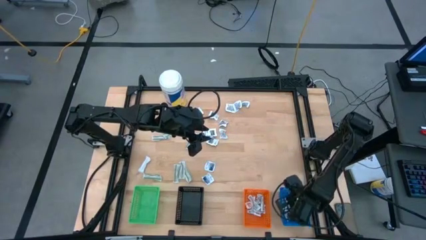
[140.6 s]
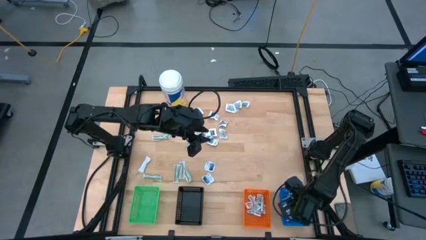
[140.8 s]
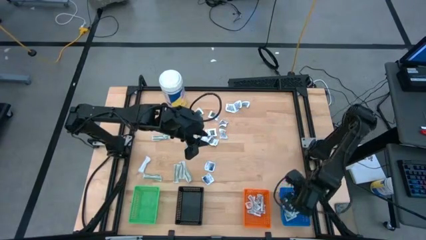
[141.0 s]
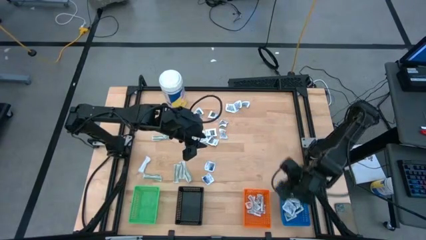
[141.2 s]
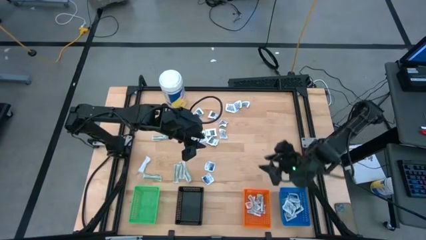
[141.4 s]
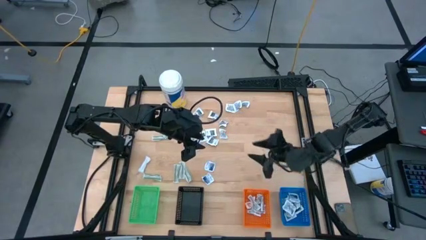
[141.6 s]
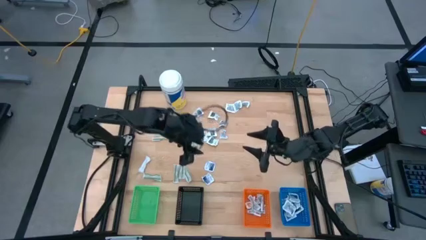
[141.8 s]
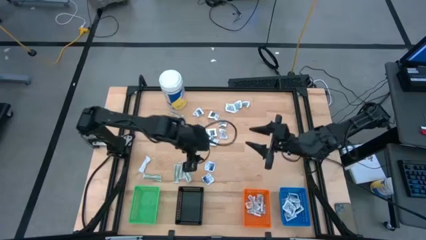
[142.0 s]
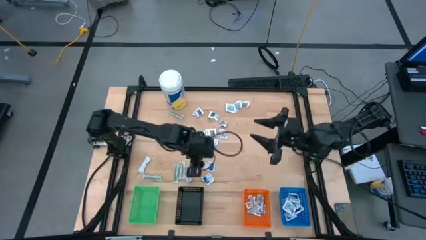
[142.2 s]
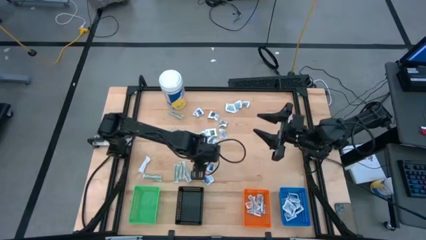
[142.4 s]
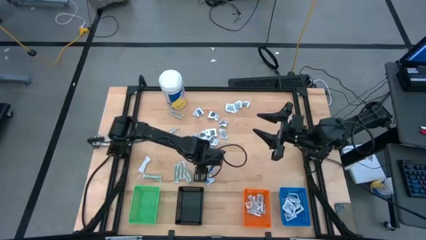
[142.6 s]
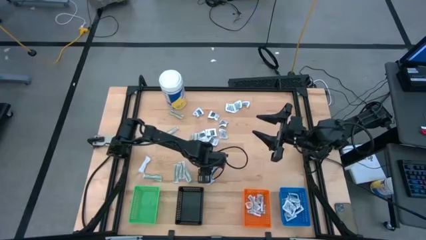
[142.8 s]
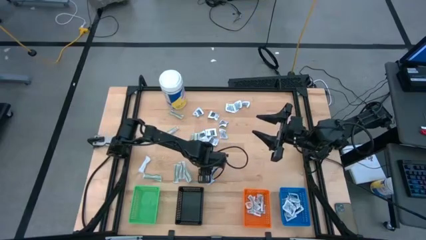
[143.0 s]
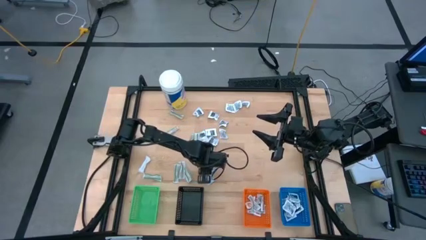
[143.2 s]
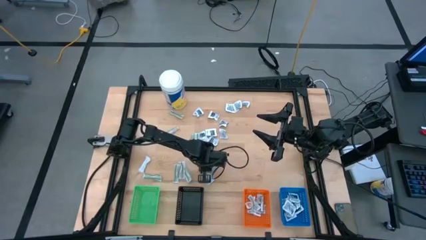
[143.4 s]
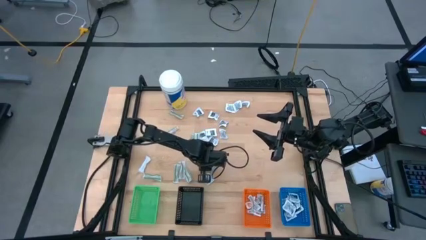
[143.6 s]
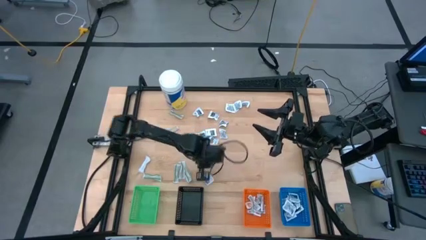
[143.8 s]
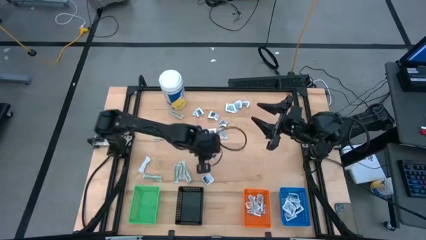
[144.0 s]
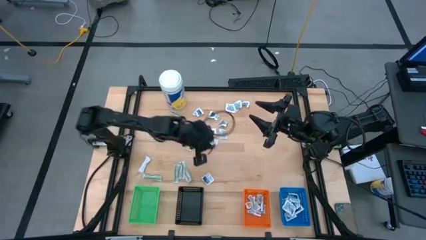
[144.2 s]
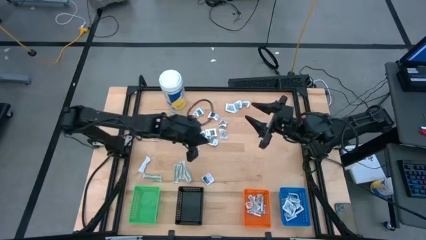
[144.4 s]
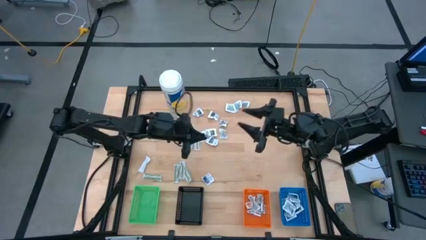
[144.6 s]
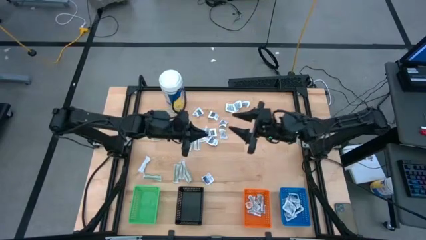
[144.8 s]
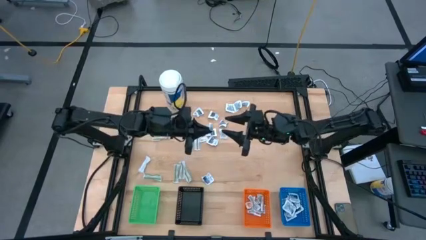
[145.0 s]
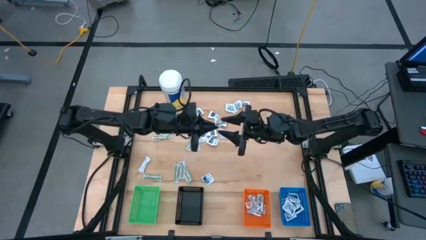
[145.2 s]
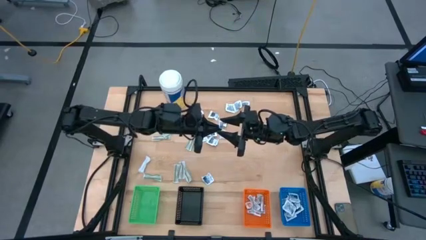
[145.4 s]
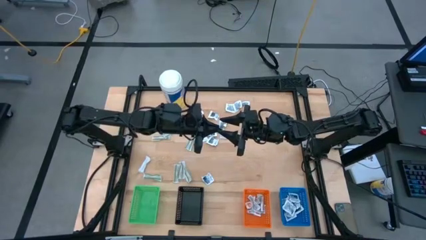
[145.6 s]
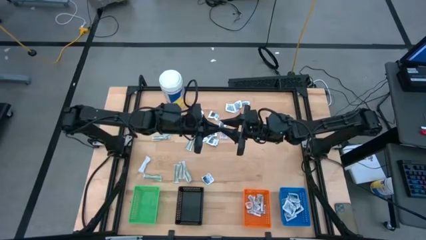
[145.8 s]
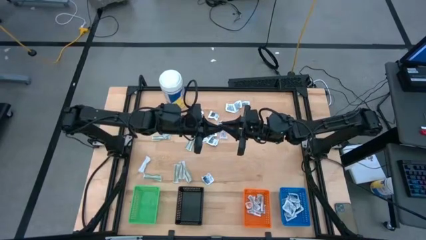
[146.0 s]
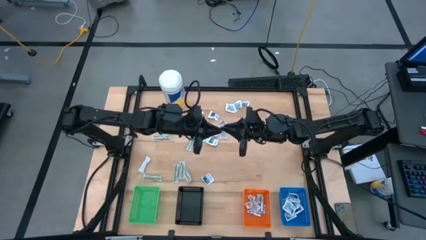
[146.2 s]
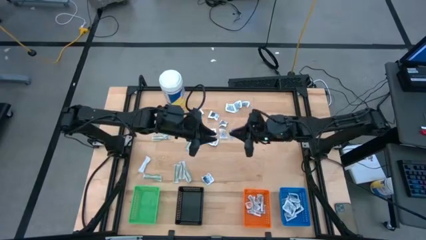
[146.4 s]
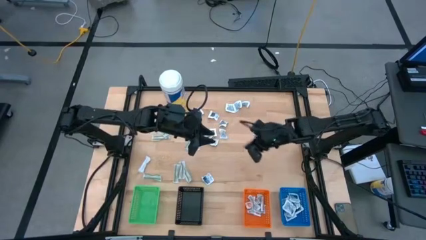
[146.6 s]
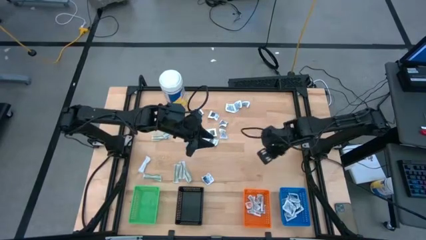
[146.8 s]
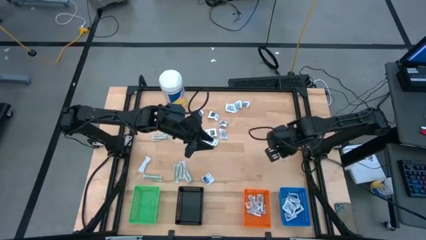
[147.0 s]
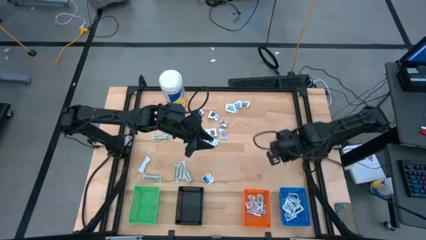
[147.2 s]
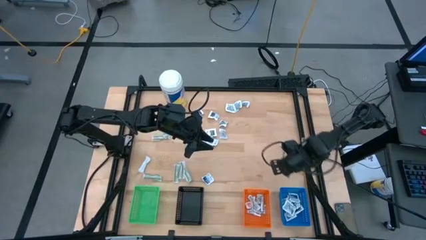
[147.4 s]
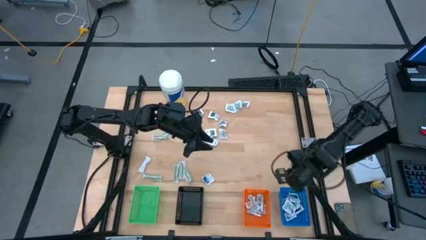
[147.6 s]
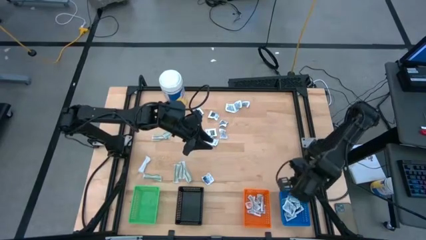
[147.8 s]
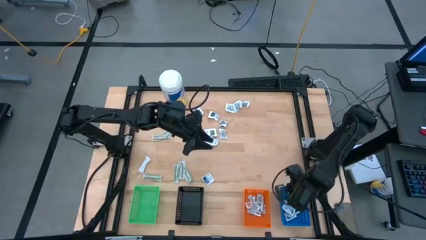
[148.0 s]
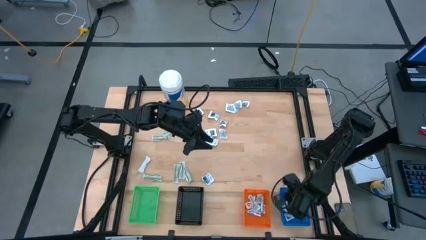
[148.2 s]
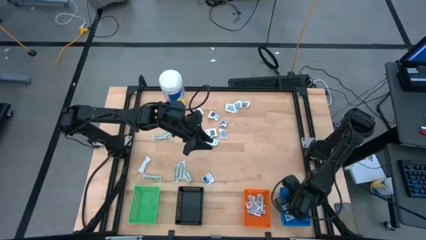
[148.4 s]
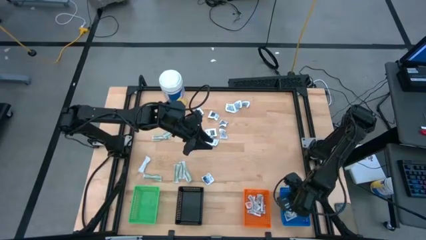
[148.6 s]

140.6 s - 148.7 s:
Task: Pick & Place First Aid Supplies
Put the alcohol pad into the blue bin

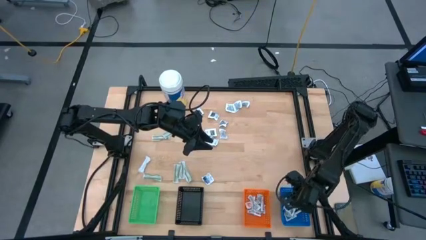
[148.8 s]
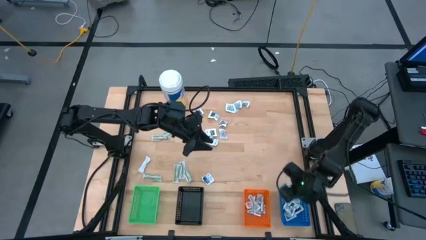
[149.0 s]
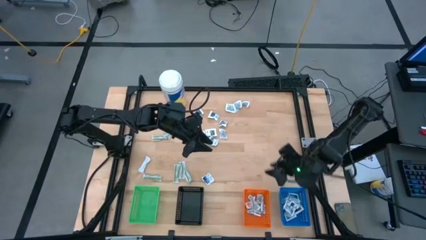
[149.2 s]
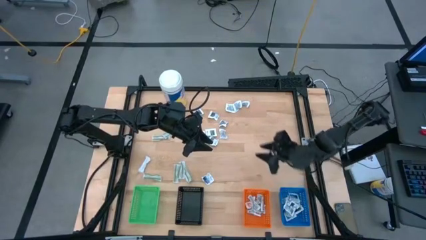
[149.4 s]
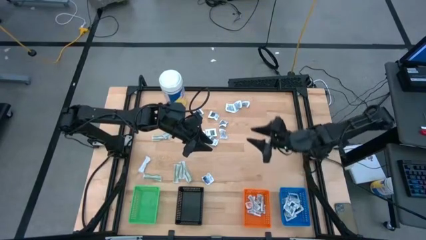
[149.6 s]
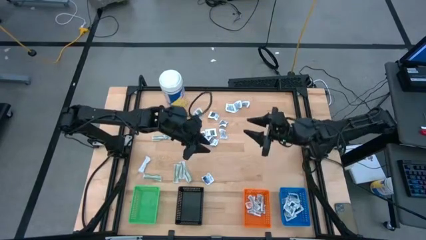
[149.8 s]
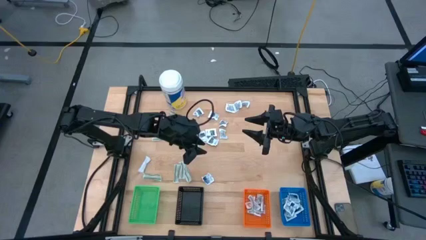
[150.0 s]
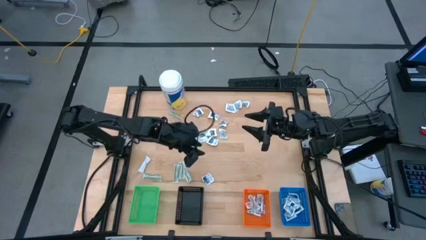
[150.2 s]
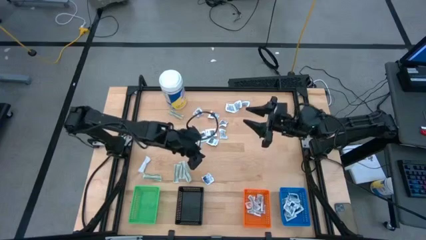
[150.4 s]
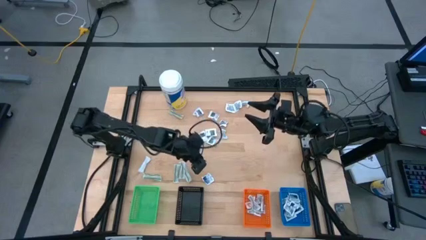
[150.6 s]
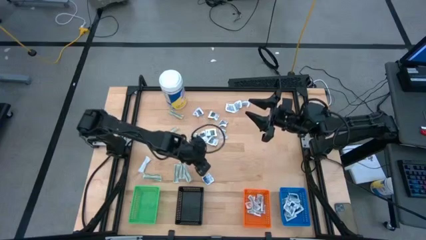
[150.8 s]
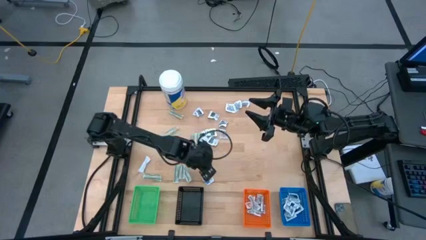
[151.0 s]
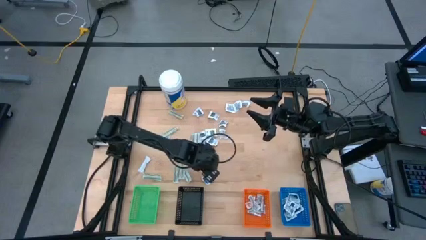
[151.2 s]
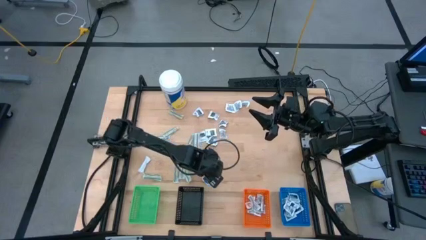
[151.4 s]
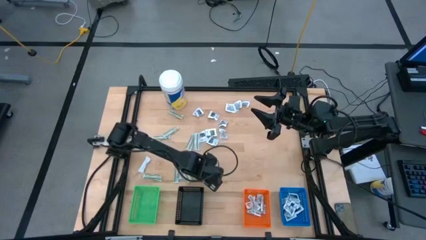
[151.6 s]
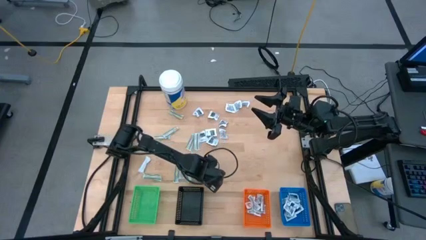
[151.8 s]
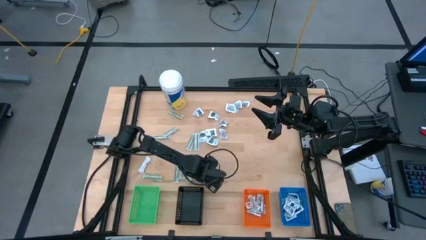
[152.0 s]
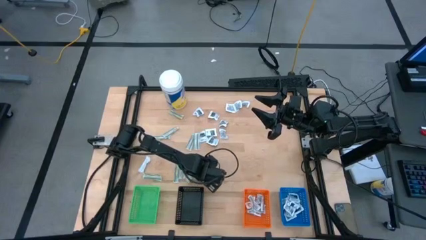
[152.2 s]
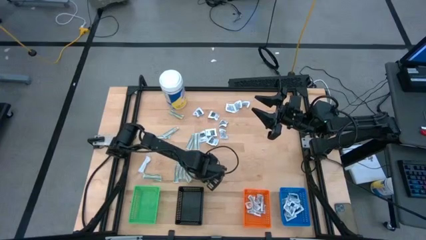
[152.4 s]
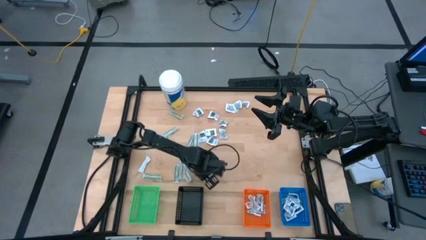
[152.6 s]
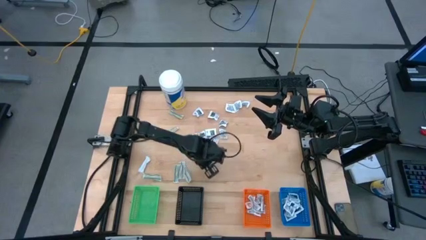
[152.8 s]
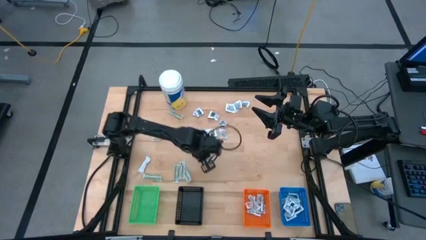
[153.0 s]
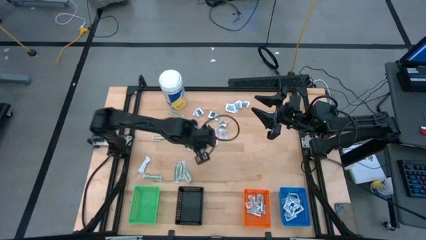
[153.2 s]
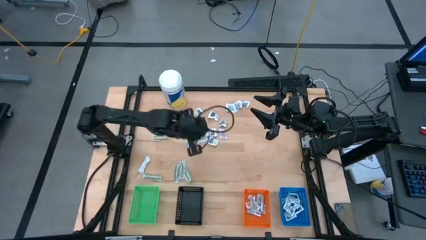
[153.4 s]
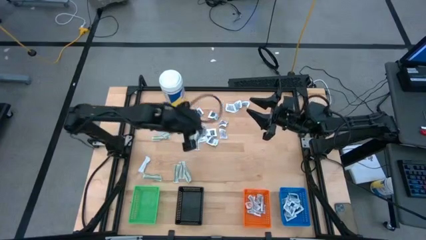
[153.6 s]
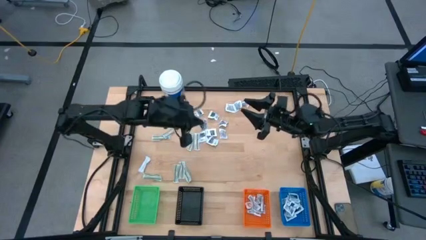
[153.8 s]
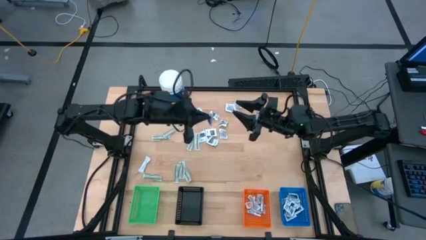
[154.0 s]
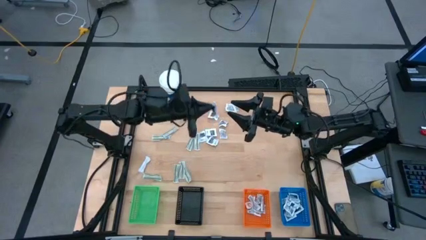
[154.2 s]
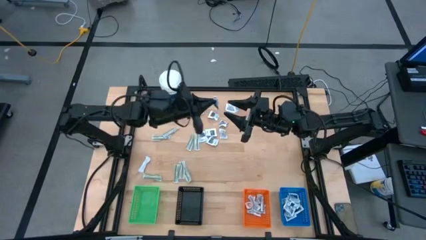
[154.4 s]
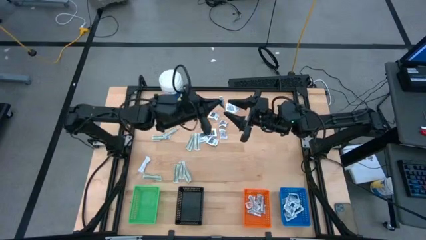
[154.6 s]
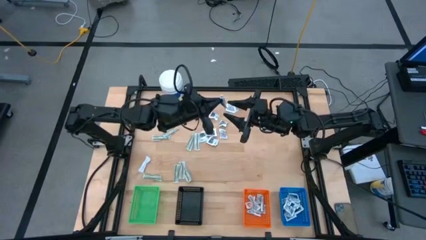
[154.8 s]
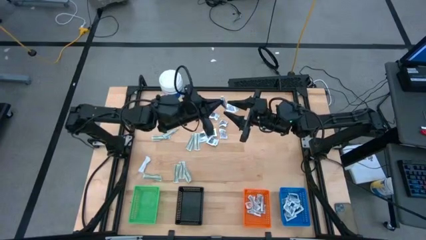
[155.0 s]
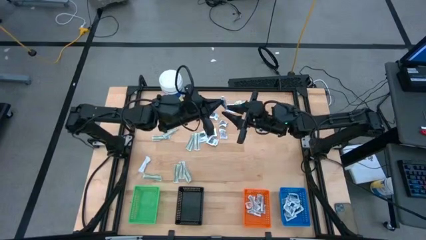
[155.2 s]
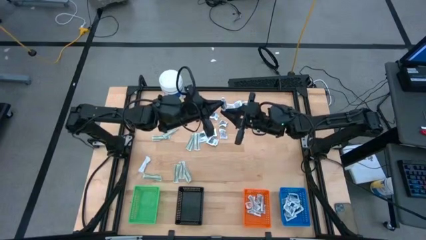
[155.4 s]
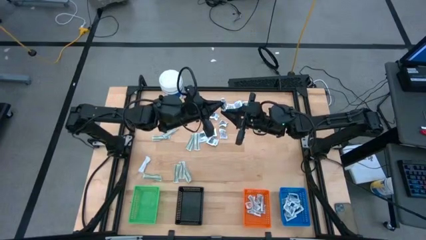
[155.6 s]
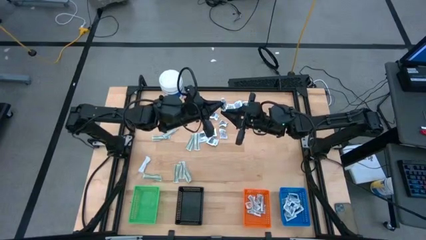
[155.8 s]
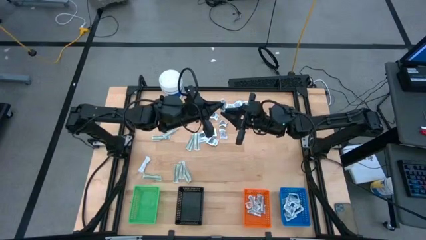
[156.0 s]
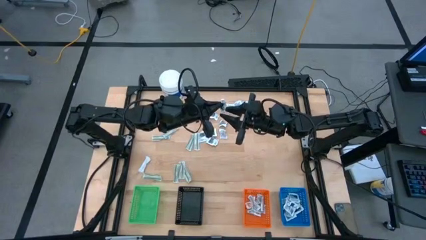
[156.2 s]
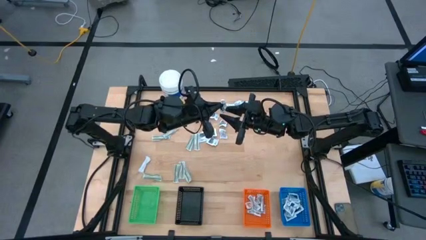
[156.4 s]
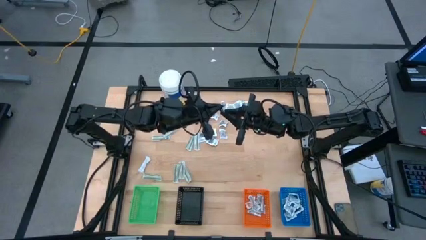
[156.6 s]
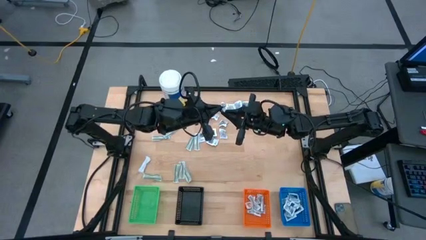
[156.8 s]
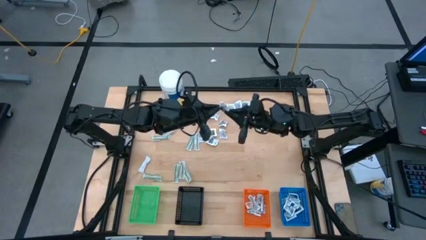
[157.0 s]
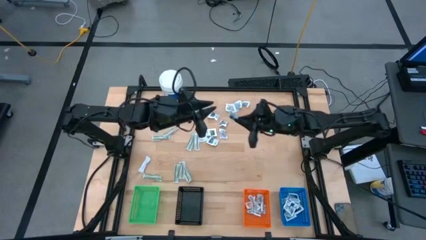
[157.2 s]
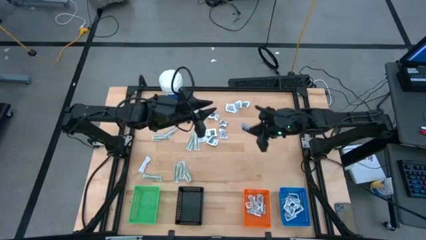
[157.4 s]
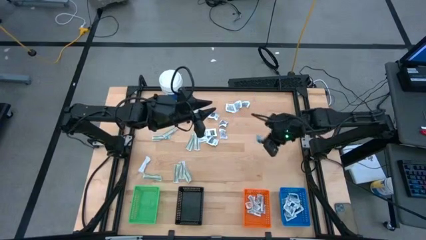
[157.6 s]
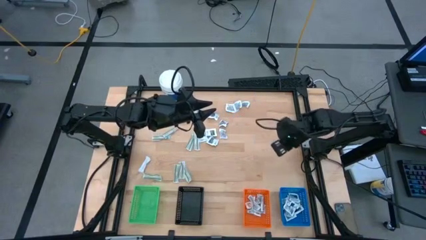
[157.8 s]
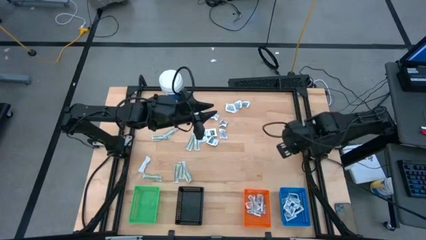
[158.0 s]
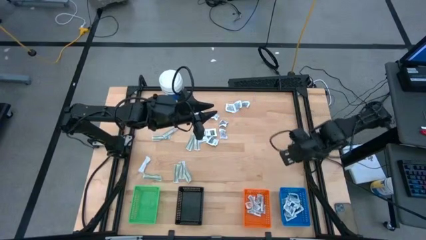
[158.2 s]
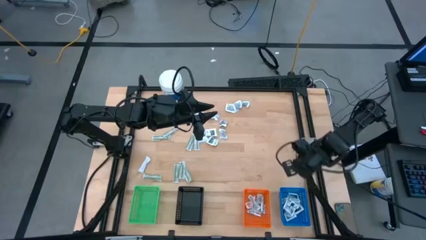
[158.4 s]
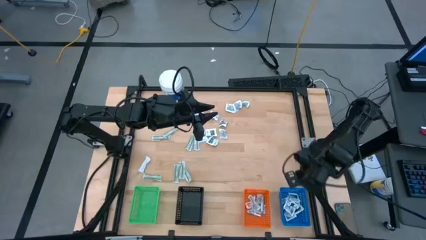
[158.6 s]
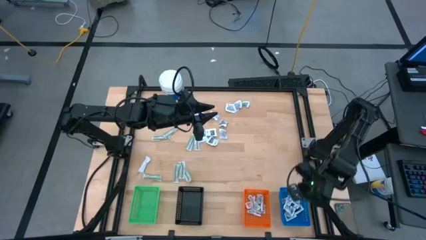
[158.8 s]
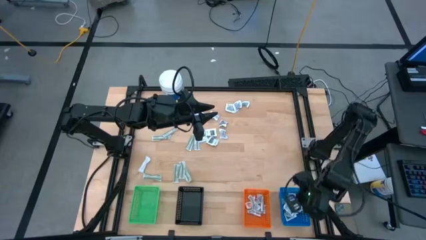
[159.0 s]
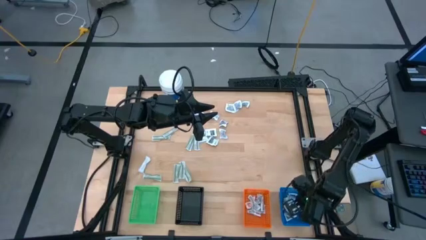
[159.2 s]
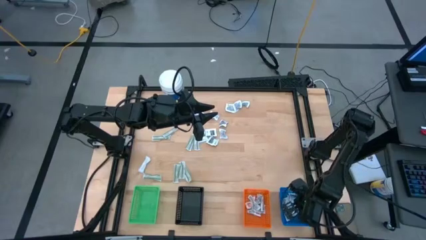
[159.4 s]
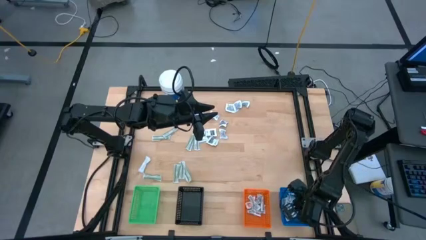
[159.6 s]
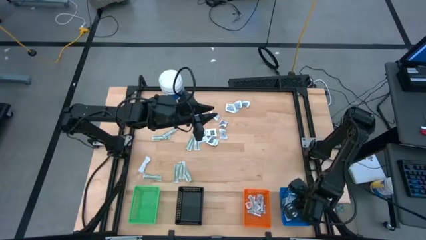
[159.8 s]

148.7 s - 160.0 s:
Put the alcohol pad into the blue bin
